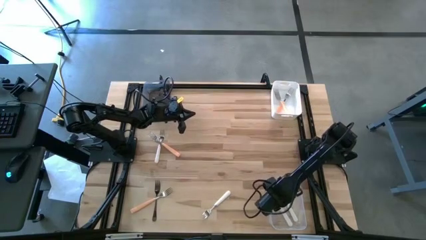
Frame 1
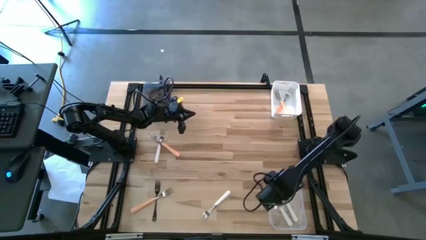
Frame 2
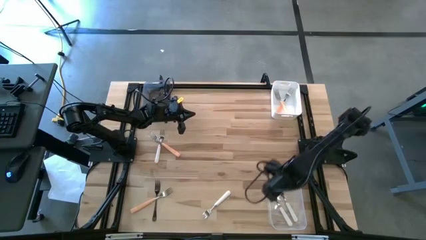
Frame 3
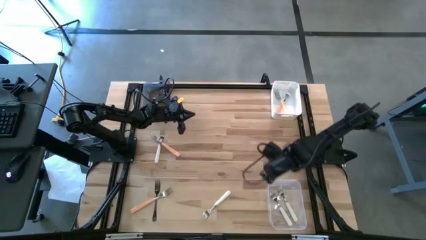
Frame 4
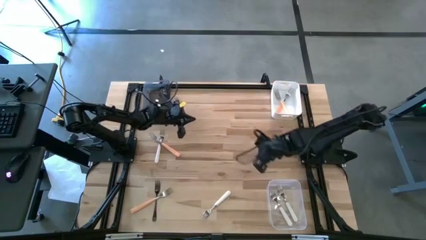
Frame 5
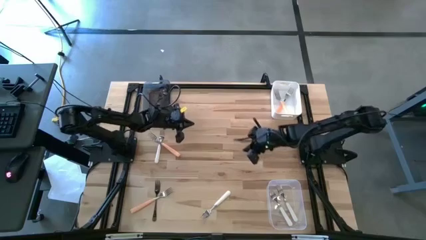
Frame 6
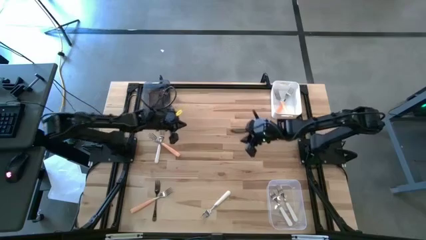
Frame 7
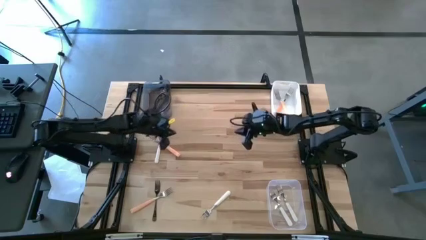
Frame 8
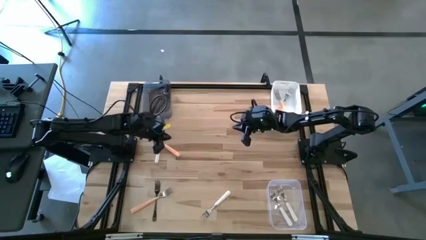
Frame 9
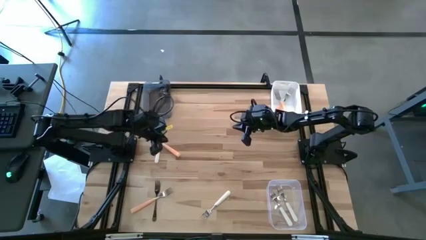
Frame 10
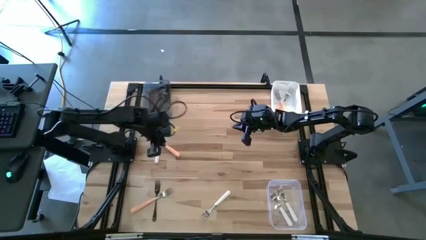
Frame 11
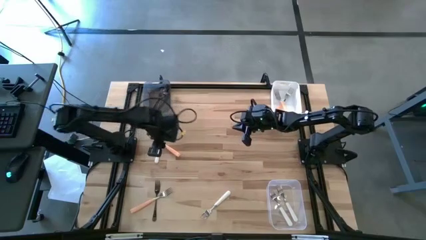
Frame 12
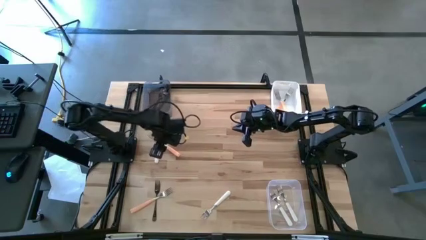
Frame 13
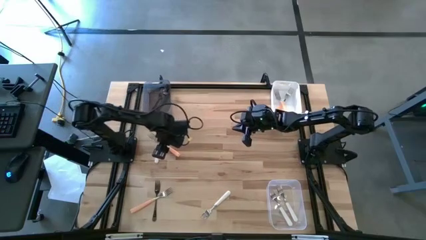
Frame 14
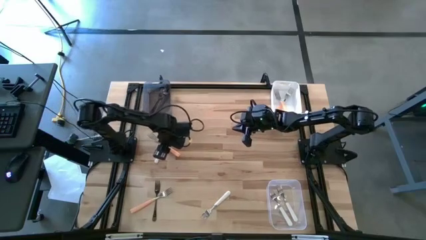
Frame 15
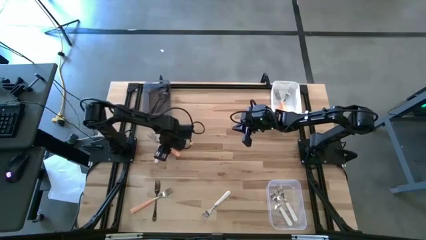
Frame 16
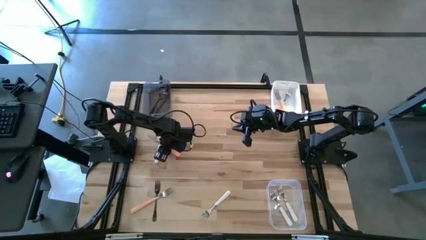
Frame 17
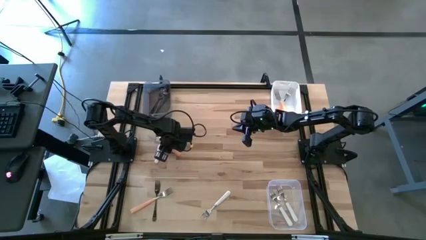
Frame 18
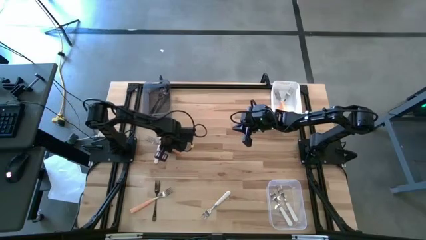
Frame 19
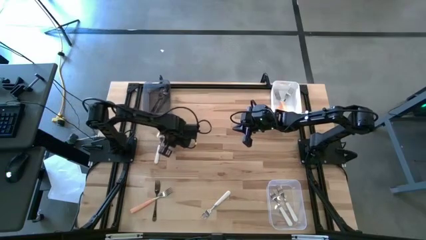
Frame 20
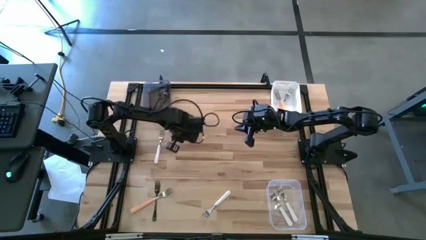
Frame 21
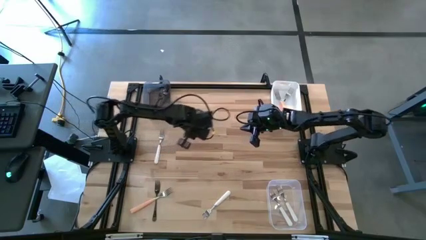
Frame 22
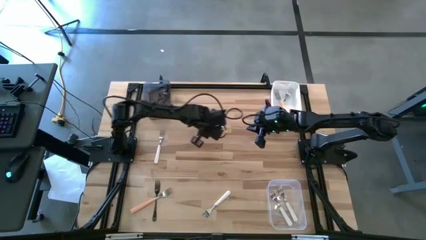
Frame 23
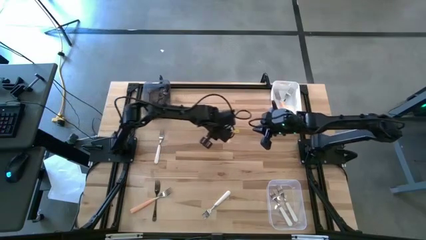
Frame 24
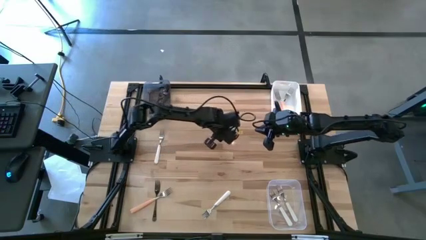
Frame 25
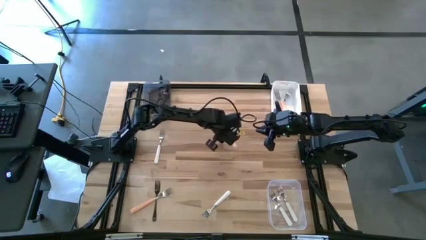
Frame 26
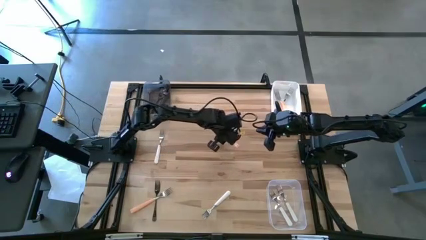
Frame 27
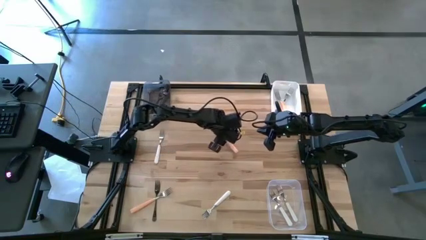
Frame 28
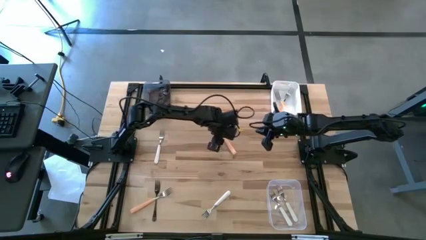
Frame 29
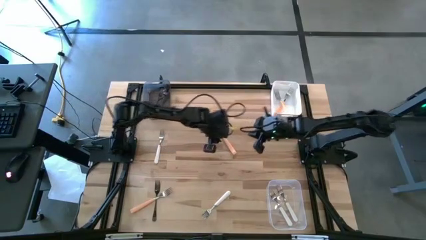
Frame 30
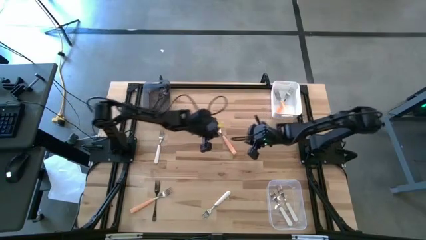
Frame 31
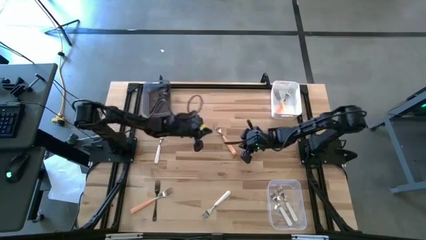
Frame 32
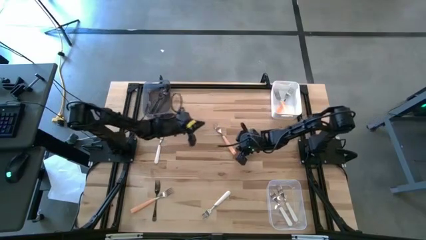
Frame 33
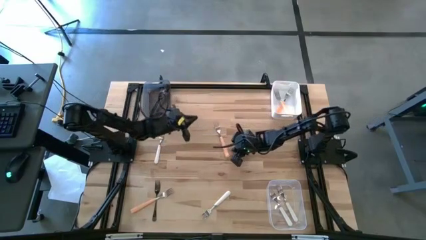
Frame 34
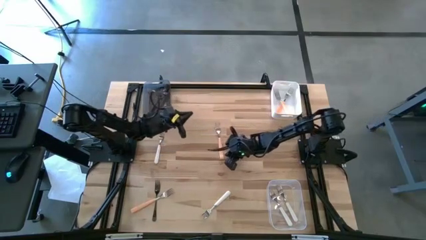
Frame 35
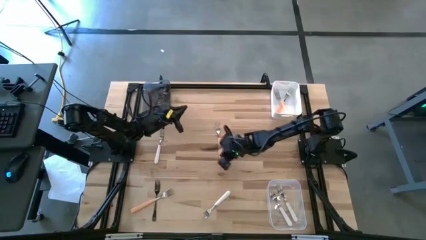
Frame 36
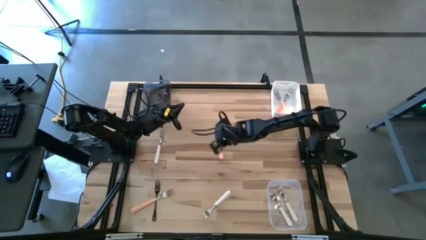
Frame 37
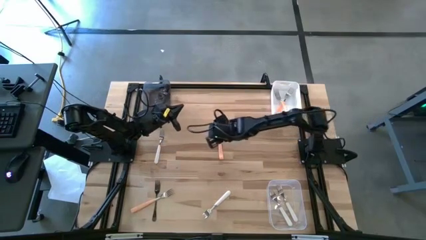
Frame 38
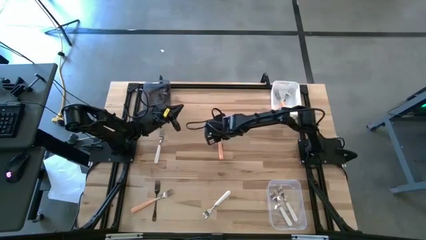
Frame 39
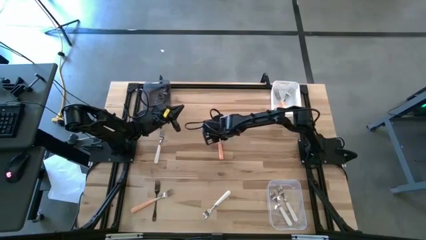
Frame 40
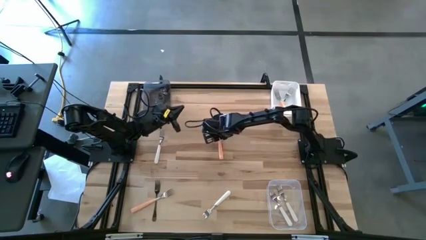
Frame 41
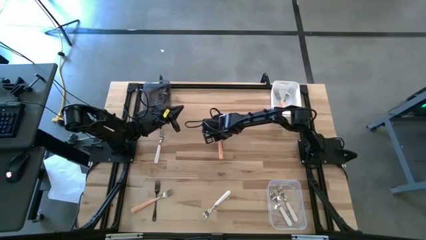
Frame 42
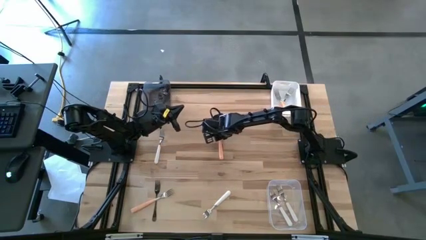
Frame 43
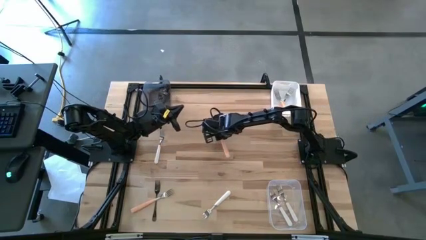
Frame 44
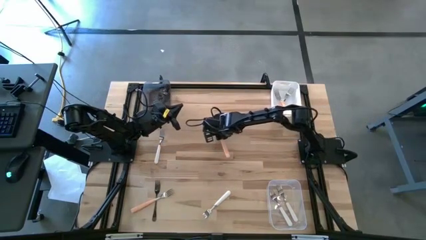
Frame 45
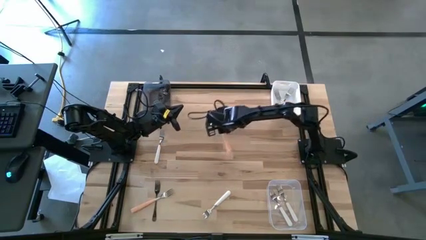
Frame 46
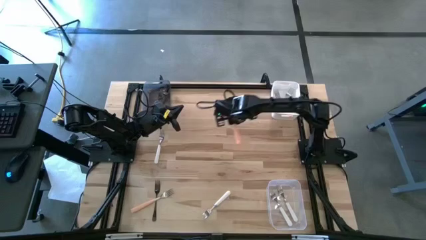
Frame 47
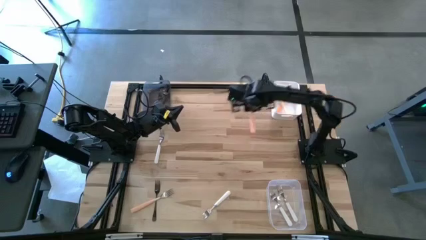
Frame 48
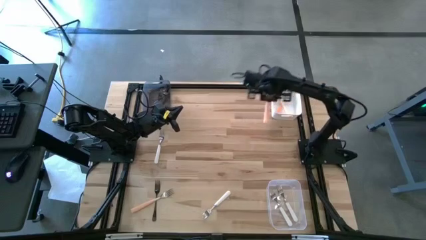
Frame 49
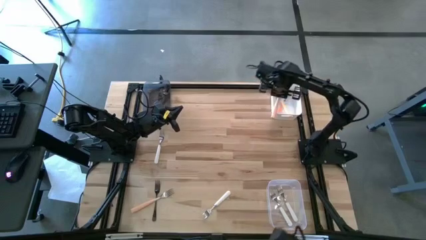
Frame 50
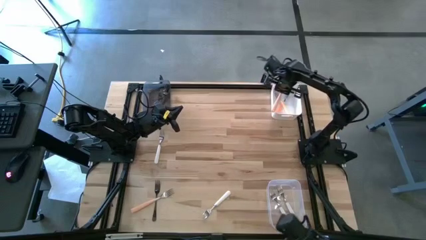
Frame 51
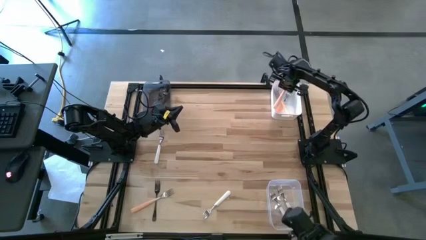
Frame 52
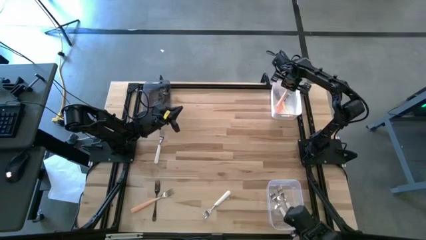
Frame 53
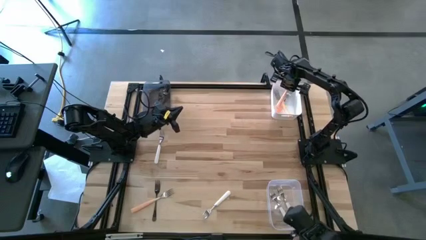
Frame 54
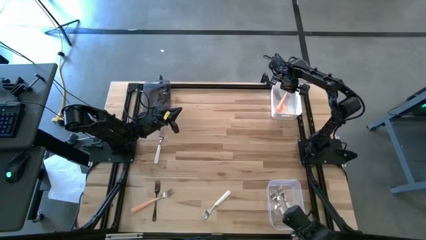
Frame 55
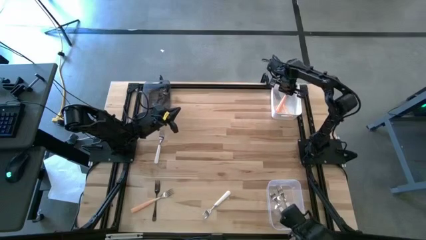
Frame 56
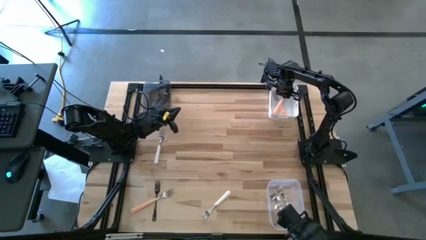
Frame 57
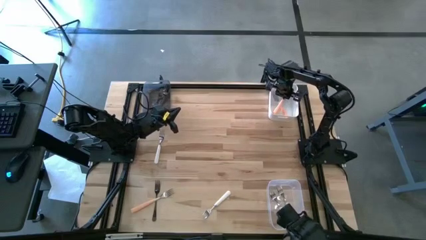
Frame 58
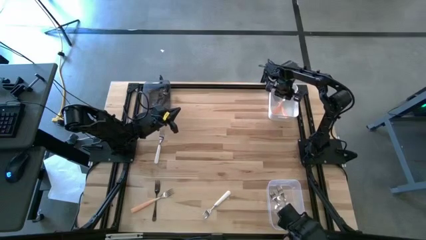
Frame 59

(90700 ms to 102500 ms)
Task: Sort silverware by color (type)
Put the top orange fork into the white bin

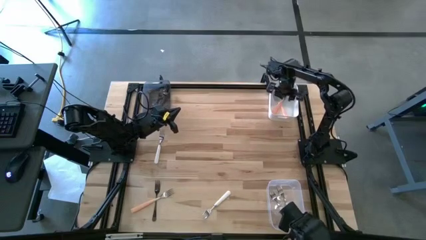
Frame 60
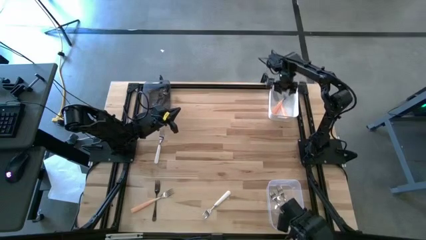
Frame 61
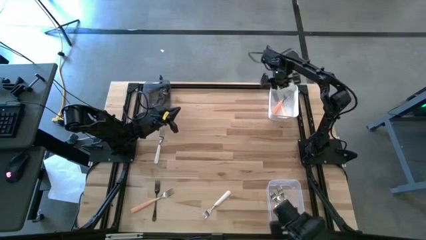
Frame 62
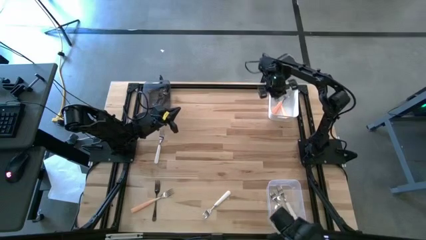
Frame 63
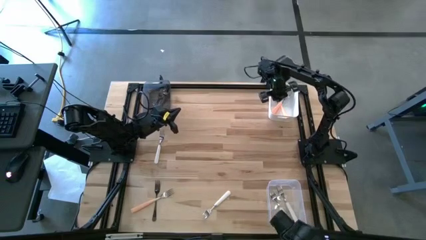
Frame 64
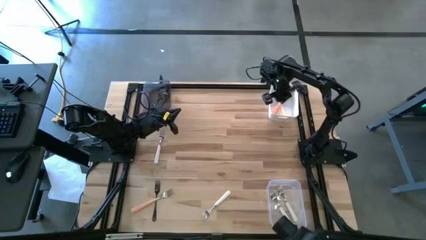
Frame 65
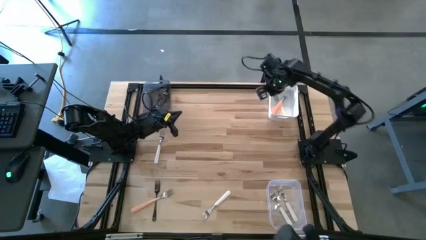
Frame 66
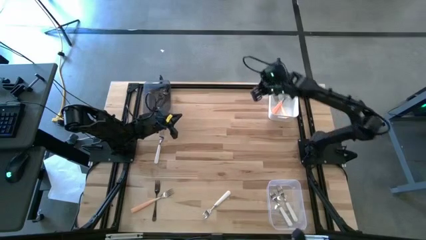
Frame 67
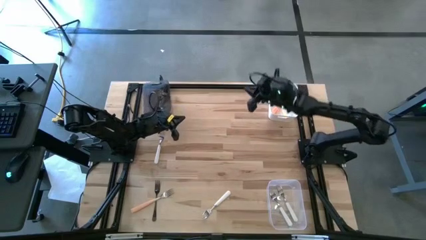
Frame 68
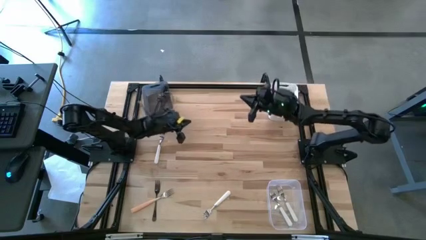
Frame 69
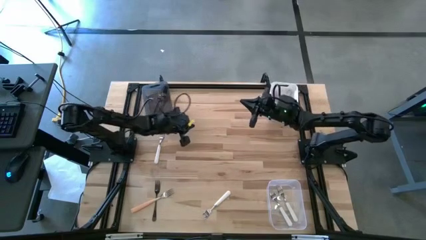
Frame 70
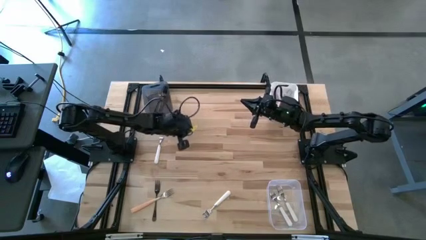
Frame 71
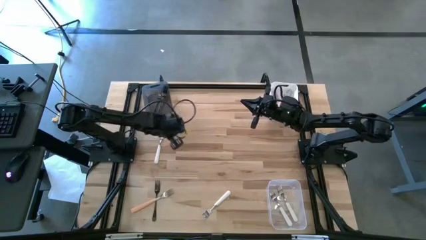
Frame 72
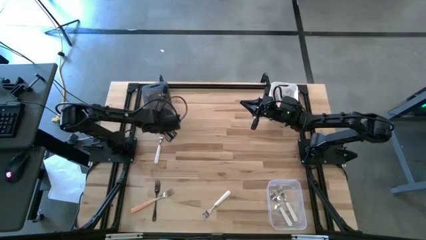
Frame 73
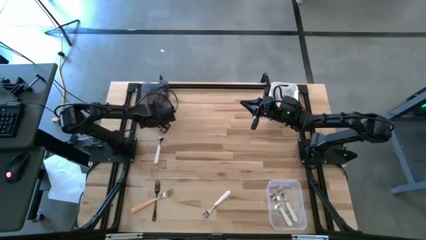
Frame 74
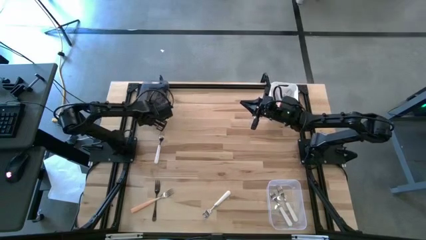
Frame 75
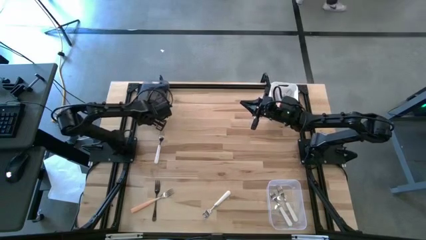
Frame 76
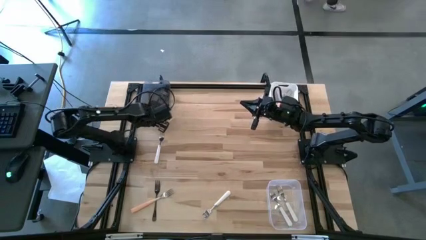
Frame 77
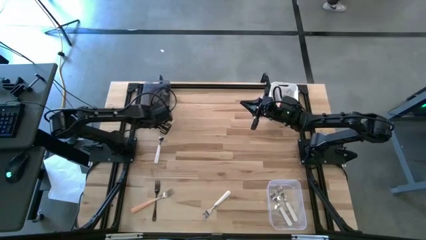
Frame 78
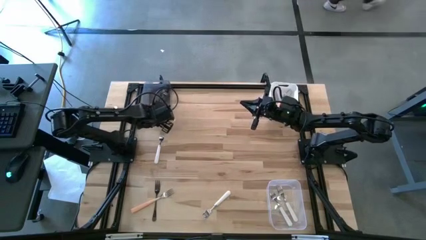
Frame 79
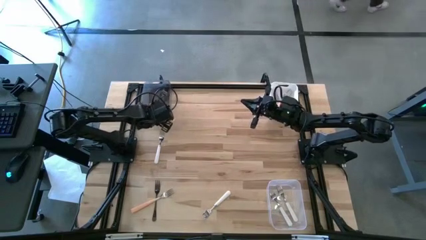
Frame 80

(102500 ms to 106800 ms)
Adjust the black bin
